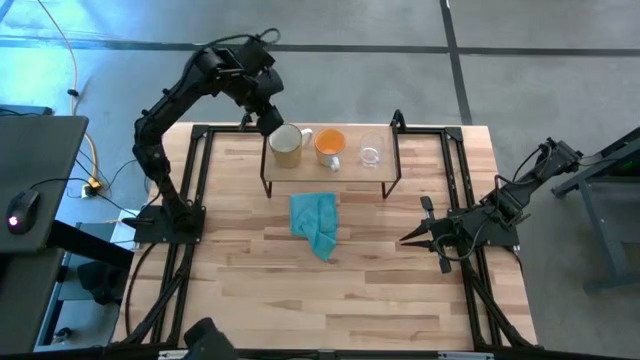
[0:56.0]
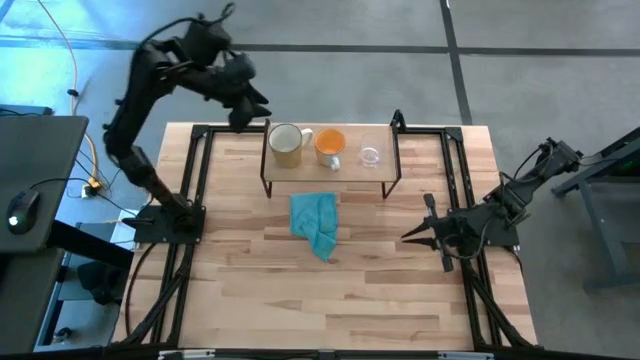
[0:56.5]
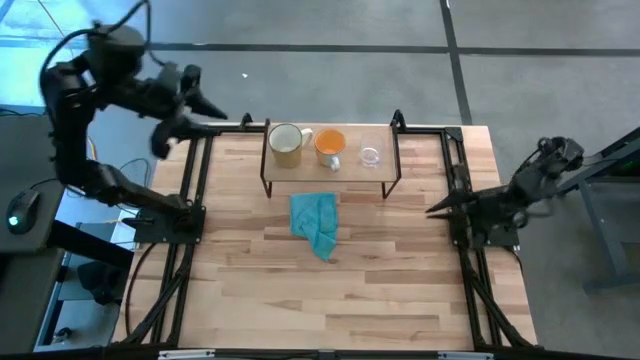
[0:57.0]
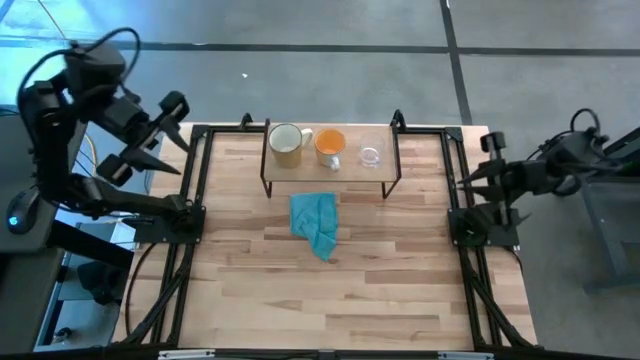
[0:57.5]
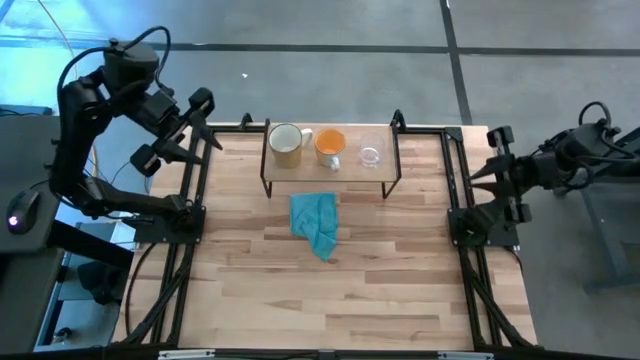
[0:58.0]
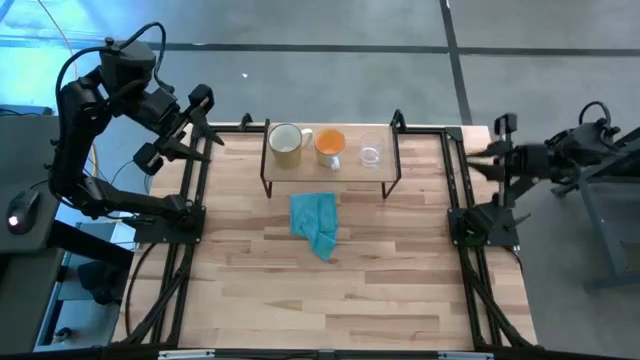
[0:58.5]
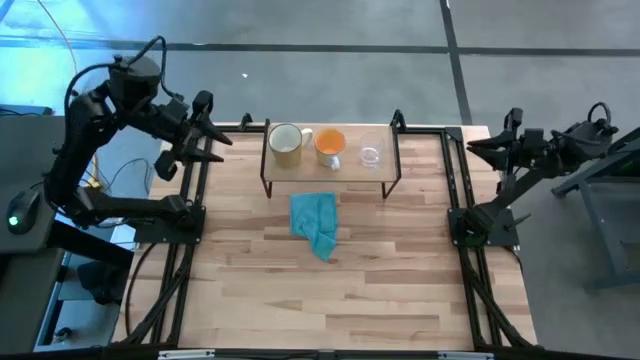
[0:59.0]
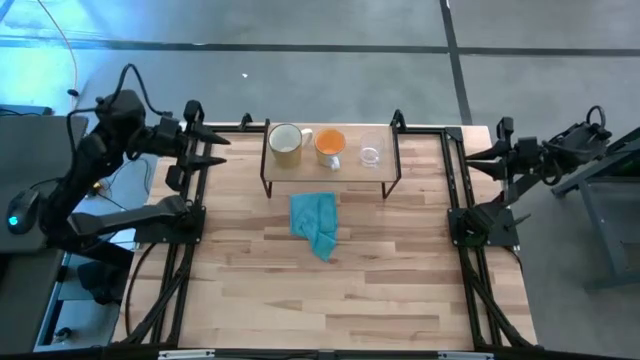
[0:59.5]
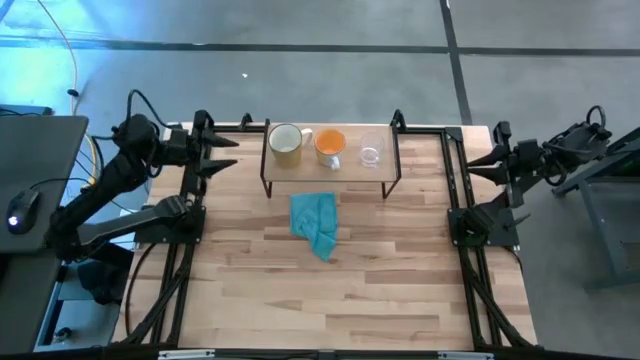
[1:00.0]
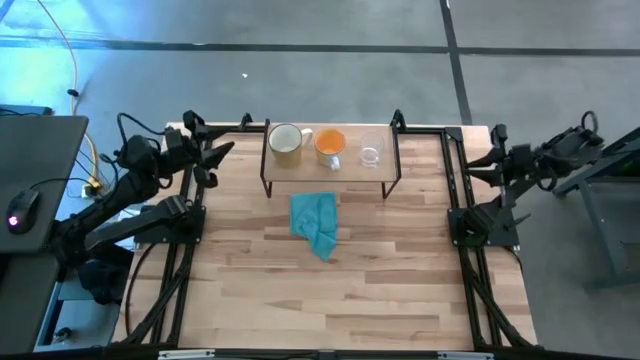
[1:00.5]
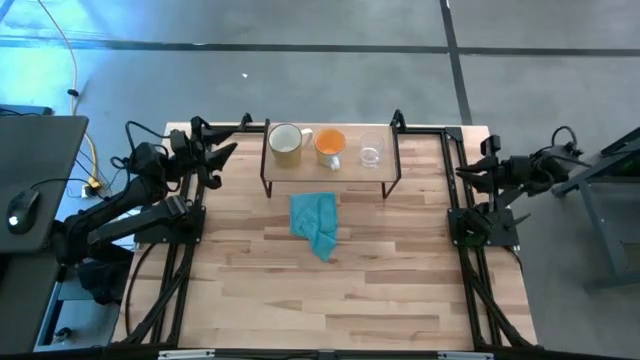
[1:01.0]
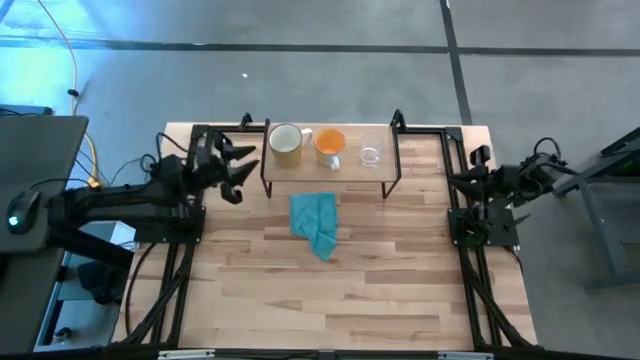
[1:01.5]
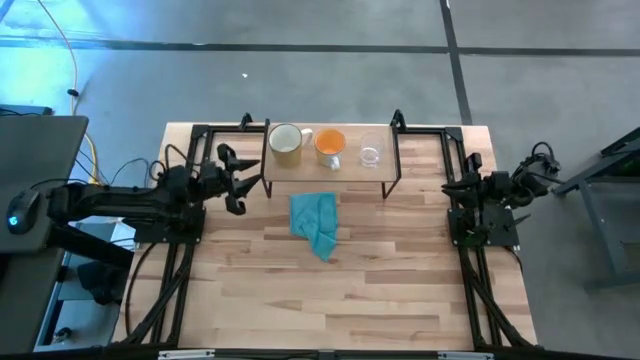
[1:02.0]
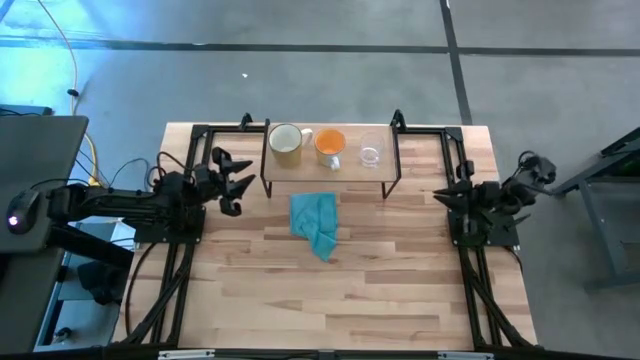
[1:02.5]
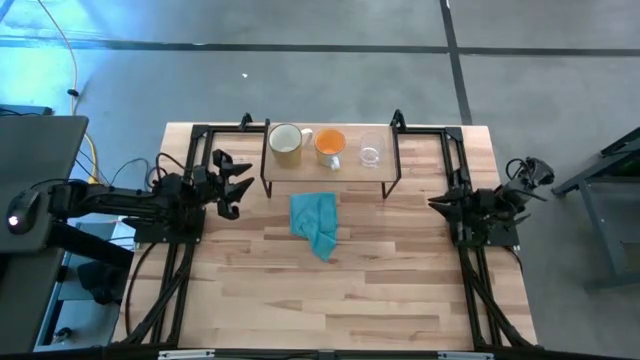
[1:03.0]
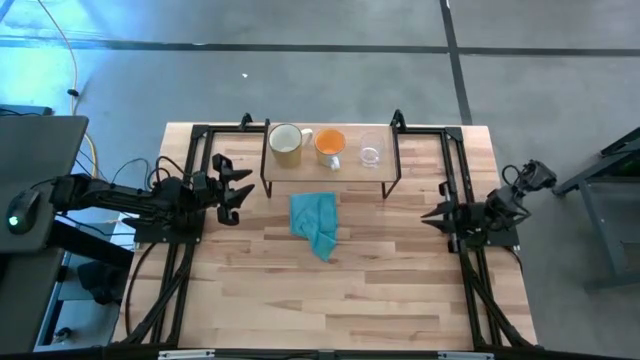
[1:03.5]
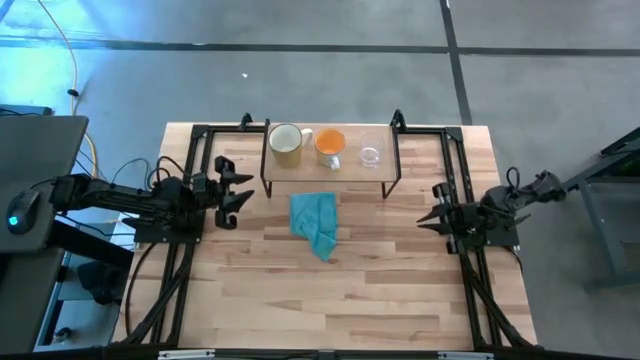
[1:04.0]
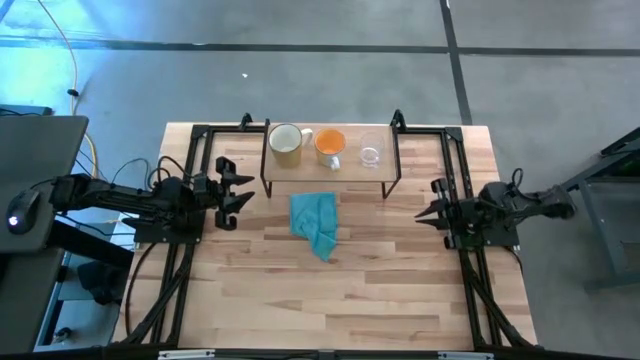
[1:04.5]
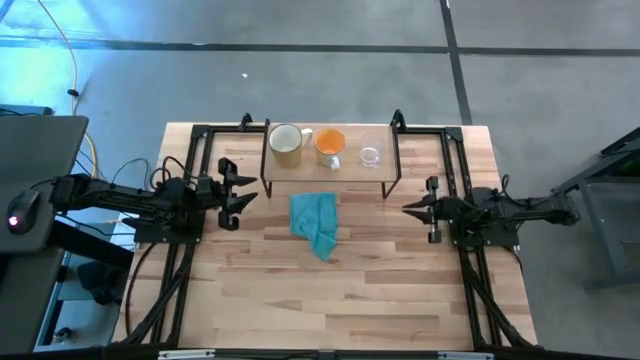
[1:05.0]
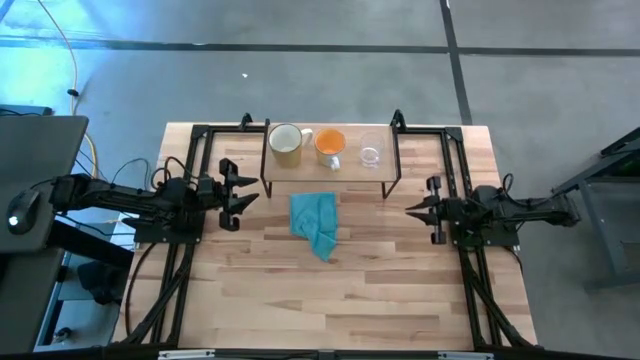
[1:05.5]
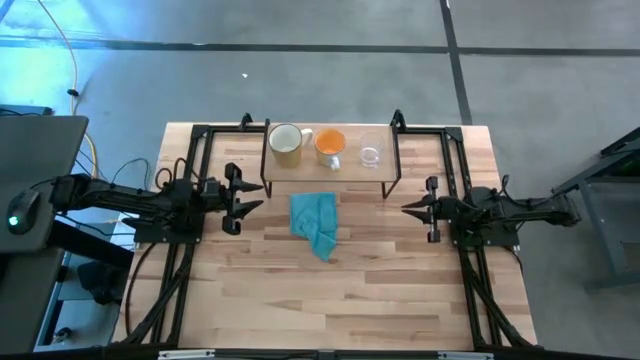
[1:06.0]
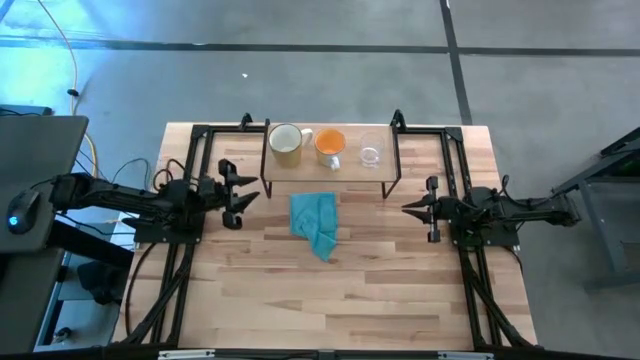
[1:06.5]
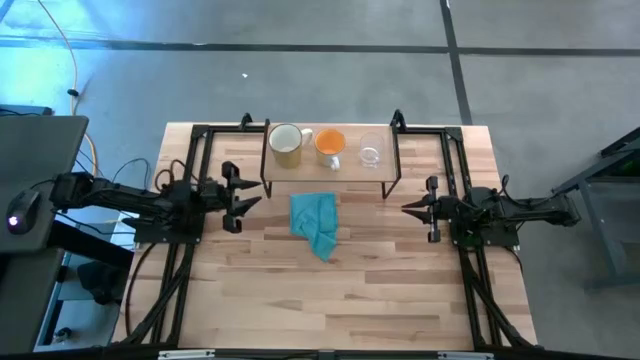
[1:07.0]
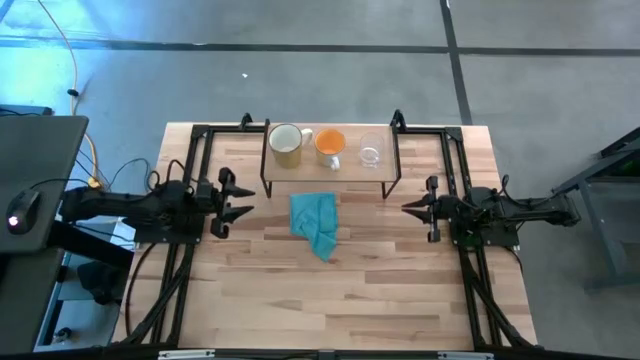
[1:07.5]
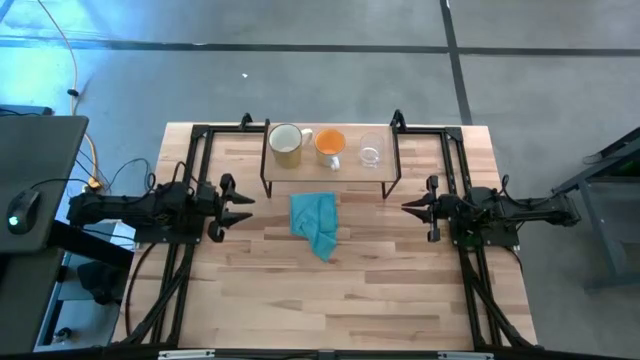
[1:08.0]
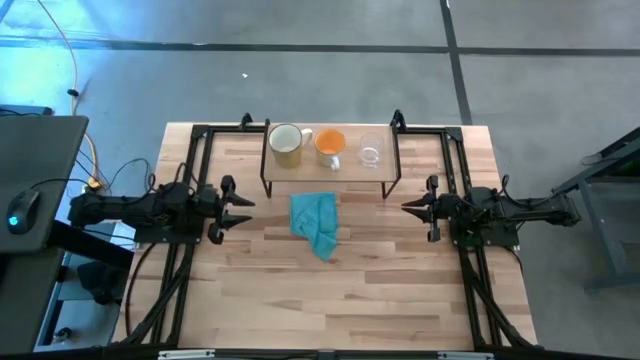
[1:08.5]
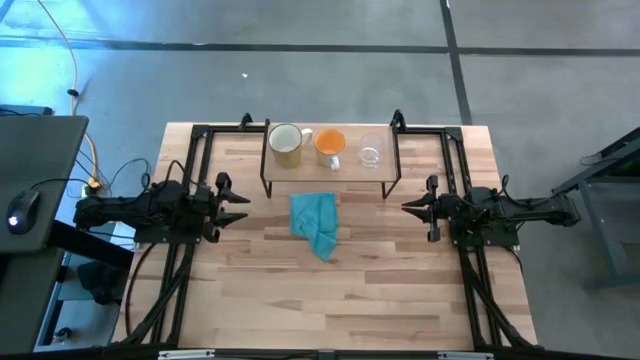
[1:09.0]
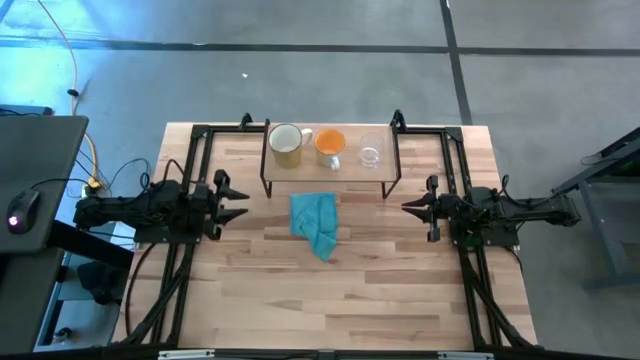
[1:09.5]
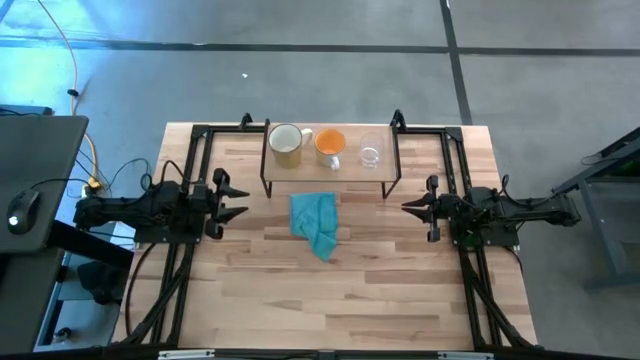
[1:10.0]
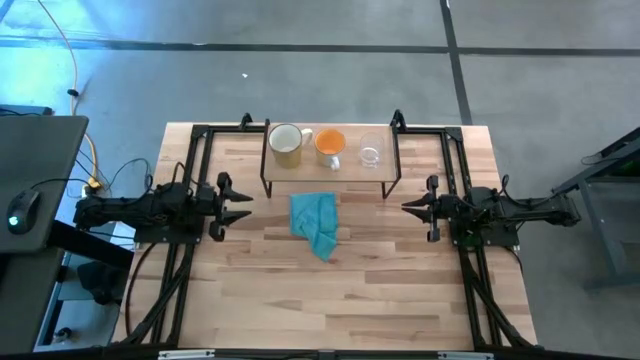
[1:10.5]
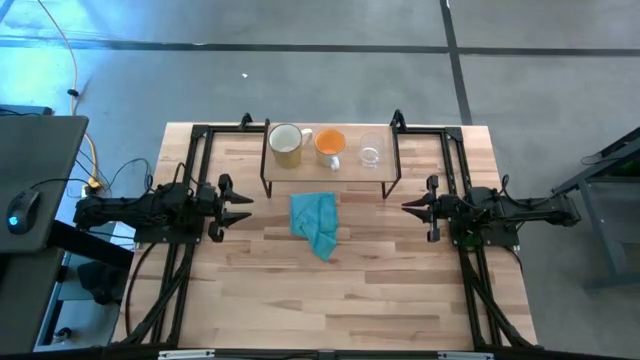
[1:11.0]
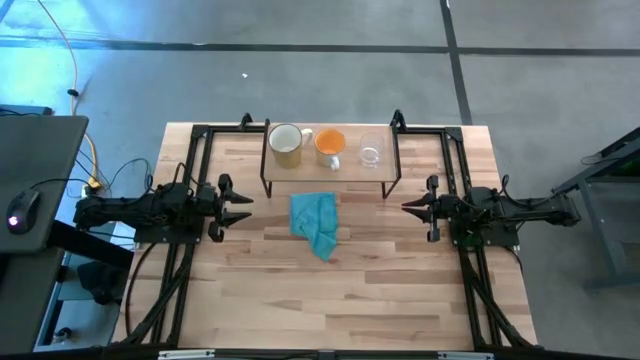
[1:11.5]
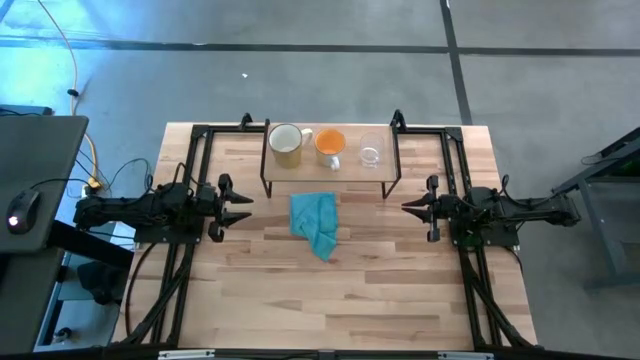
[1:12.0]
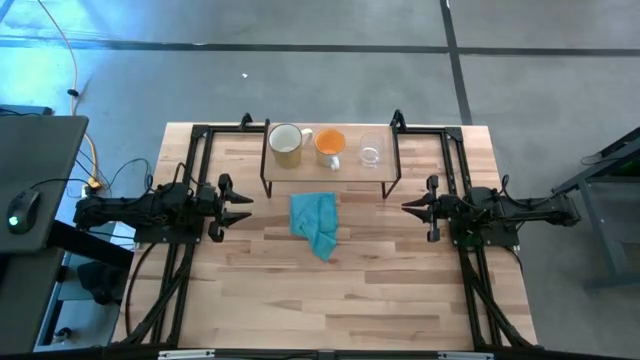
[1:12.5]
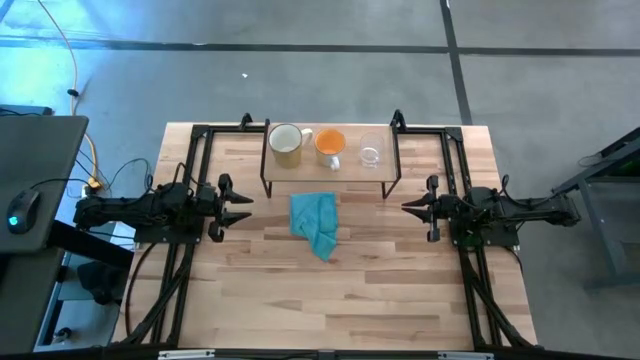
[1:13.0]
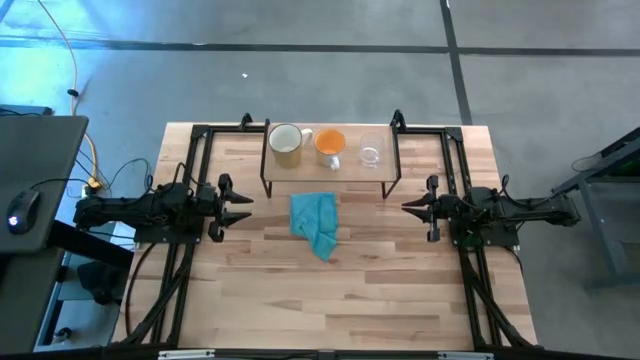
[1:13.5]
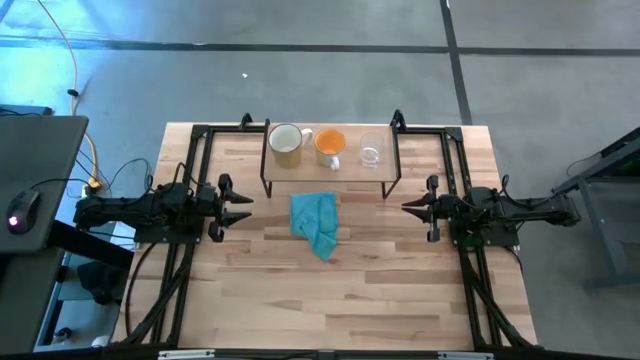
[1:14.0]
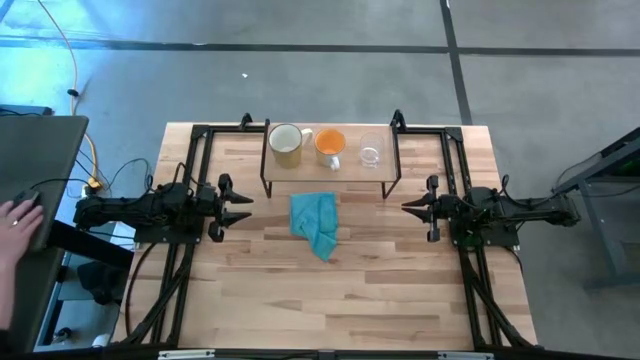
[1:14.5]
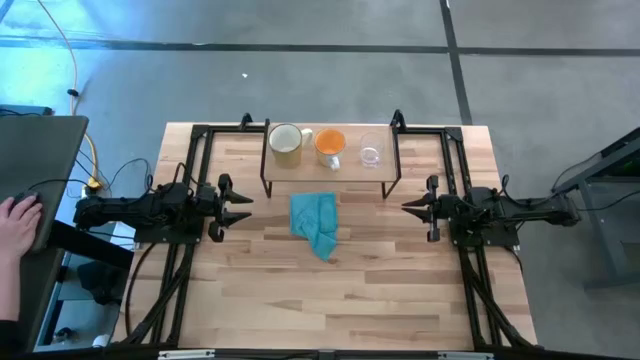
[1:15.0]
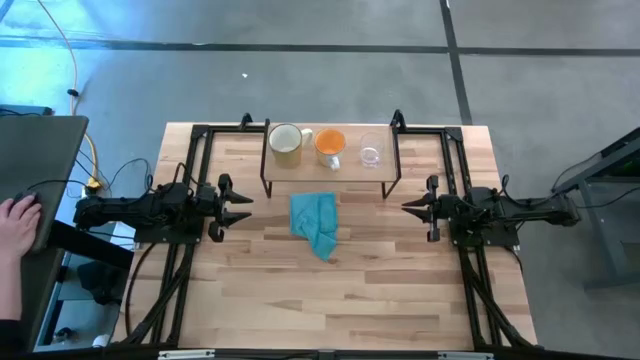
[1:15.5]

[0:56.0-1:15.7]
Task: Stack small to large cups/mugs on shelf
Return to Home Position

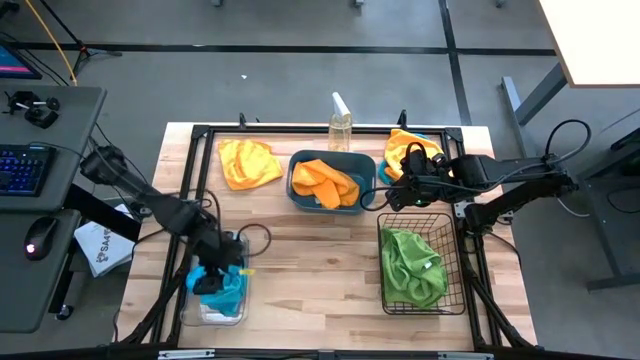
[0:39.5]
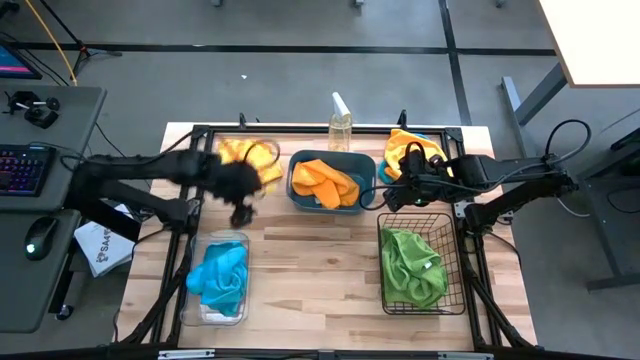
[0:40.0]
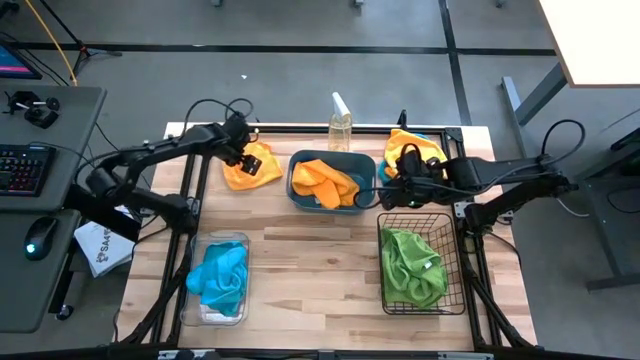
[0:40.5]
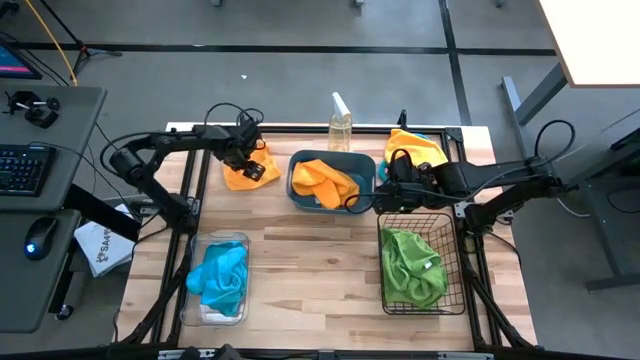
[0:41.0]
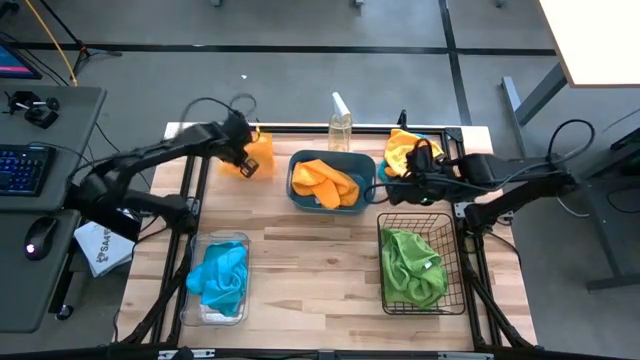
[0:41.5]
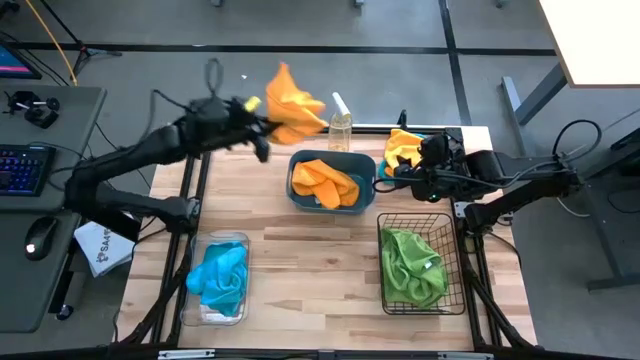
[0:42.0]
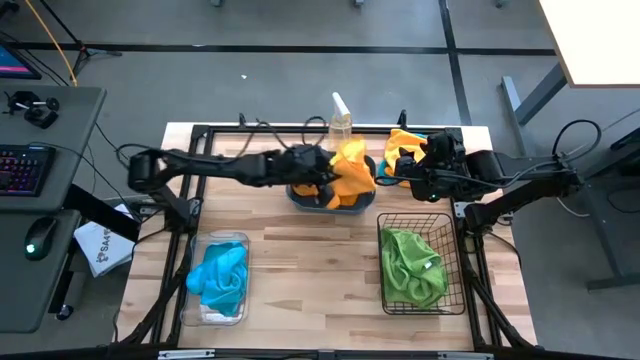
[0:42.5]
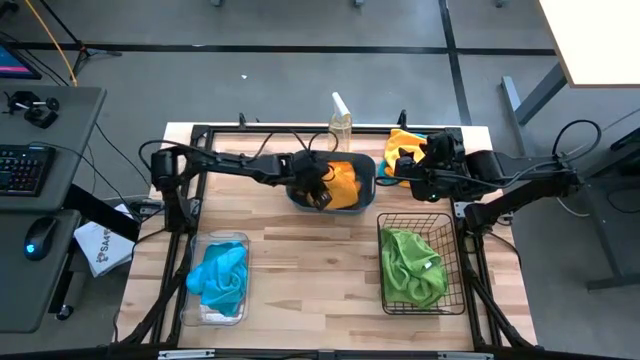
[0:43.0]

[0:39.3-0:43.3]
Task: Sort microfiber towel by color & place in baskets
Put the left yellow towel into the blue bin
